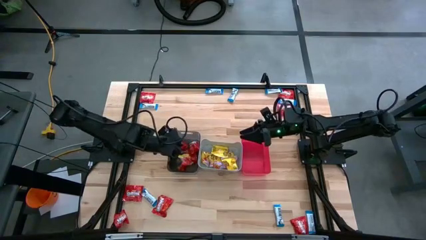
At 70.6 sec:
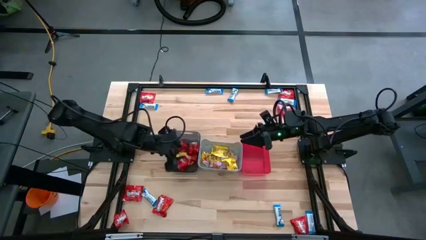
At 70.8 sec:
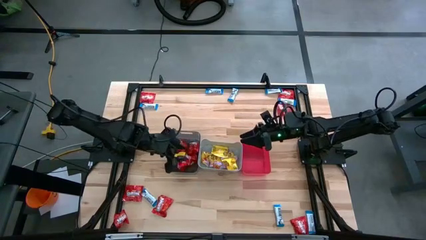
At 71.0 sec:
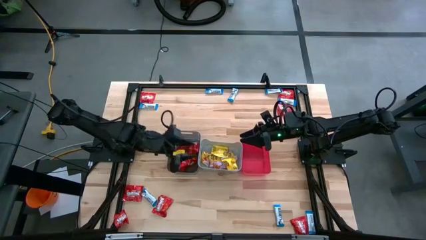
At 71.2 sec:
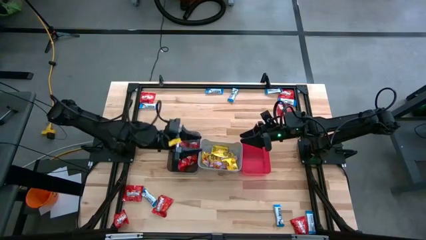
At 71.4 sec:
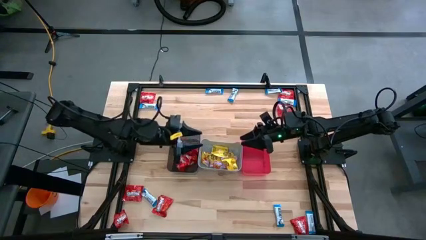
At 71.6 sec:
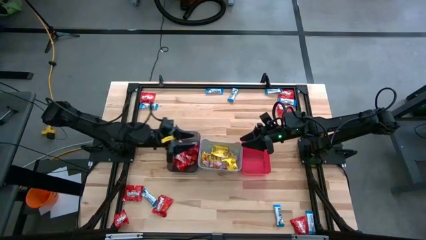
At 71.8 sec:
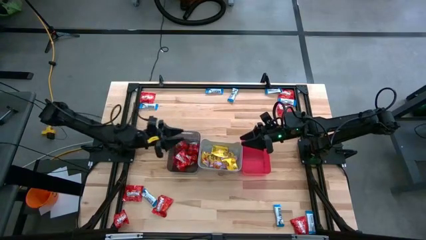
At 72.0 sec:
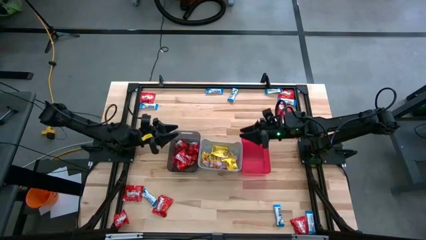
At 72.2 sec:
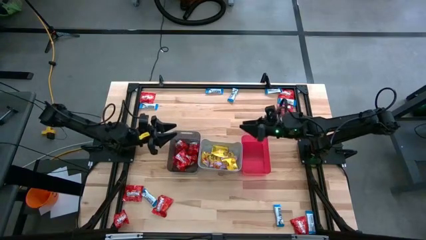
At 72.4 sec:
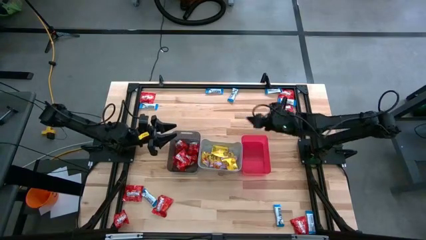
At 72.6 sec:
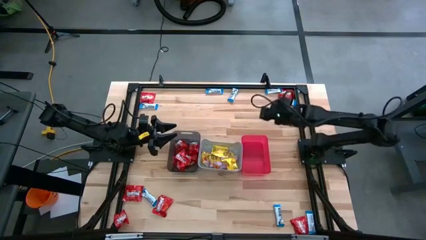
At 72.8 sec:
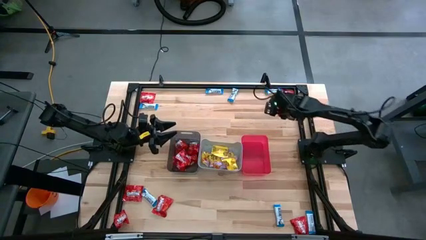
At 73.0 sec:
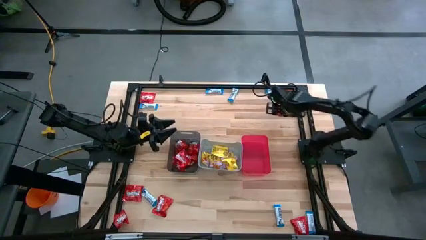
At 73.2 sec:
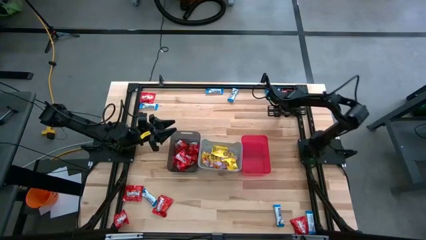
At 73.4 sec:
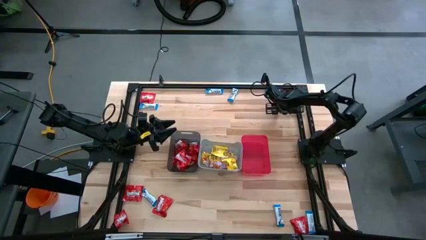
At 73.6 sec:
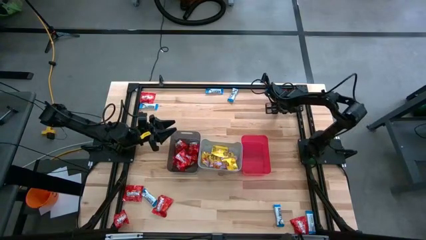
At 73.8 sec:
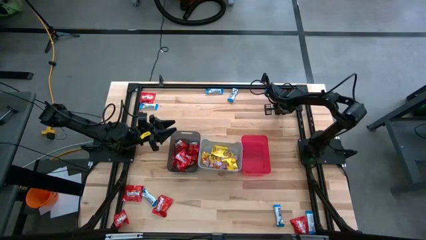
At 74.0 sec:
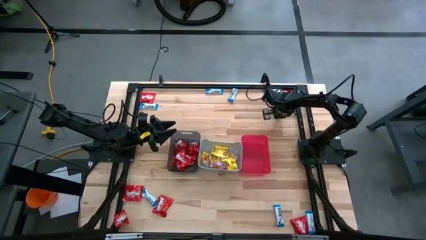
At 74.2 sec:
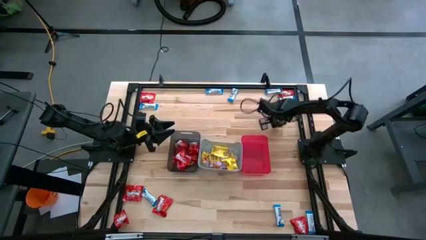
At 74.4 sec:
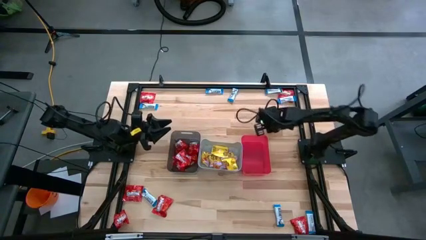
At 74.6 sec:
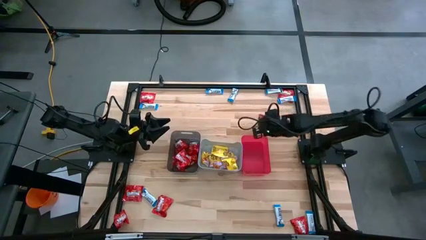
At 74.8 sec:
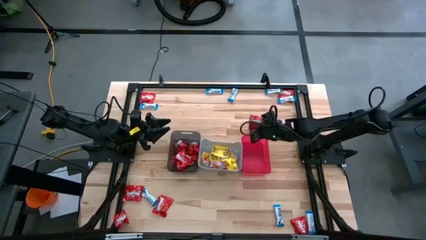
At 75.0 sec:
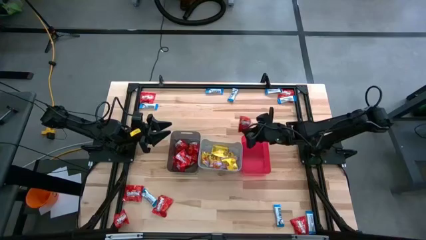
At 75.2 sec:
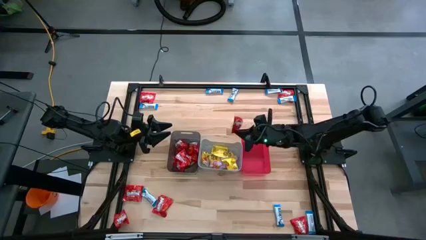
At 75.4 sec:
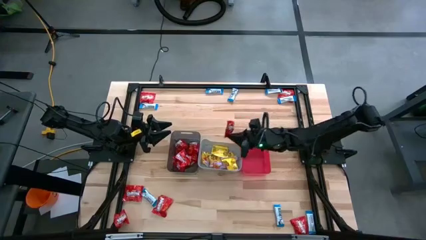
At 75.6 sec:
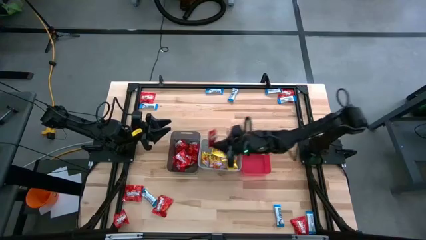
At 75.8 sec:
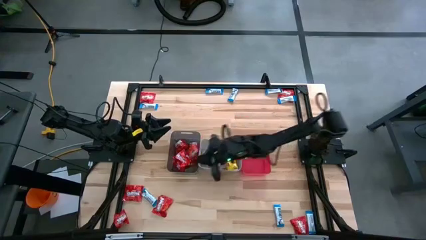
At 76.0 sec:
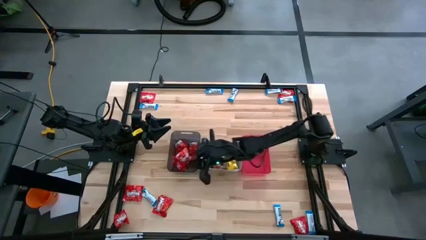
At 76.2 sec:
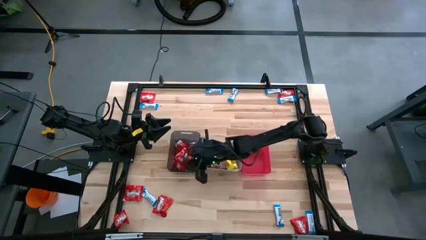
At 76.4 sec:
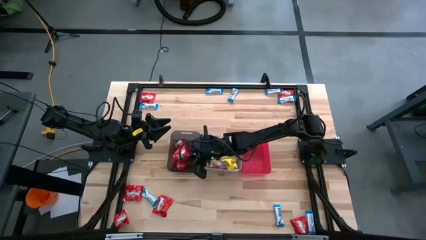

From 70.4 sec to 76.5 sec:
Task: Sort candy
Put the red candy into the black bin

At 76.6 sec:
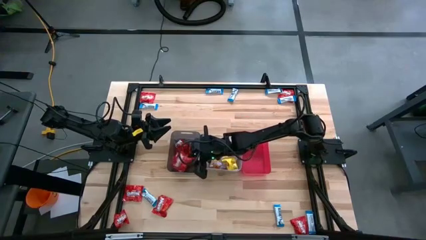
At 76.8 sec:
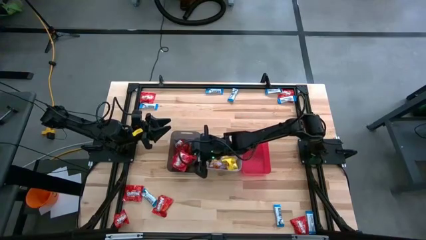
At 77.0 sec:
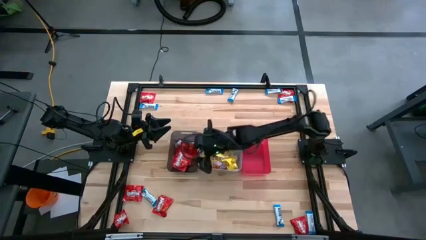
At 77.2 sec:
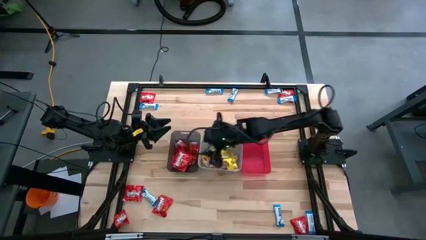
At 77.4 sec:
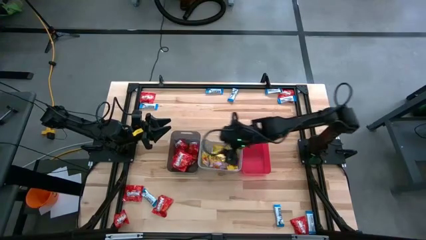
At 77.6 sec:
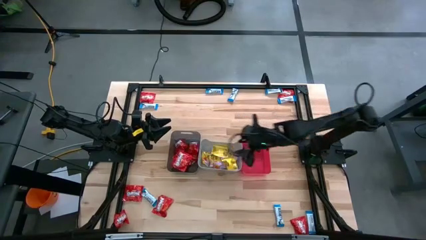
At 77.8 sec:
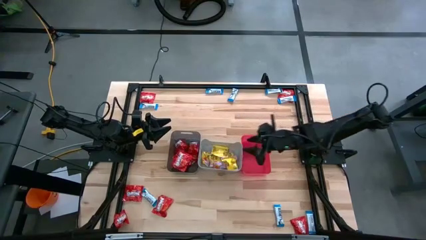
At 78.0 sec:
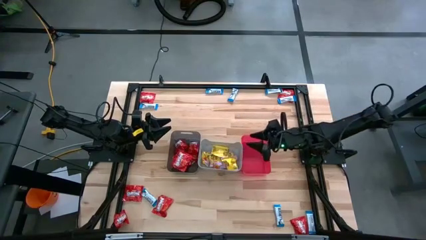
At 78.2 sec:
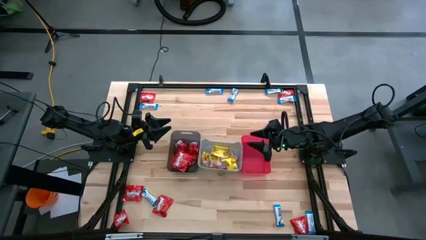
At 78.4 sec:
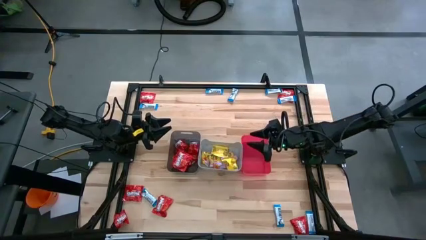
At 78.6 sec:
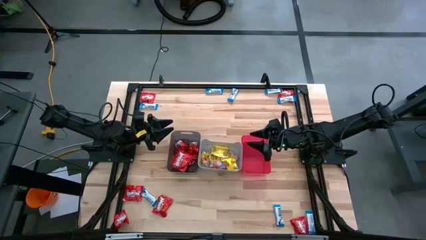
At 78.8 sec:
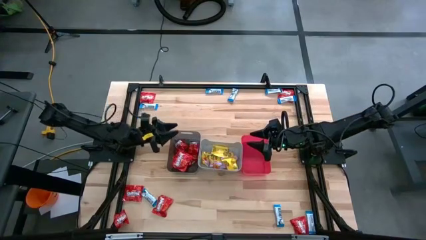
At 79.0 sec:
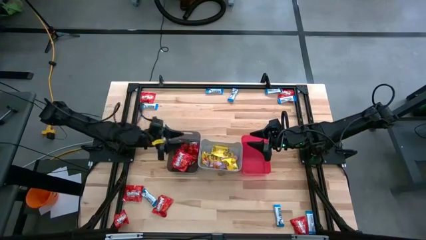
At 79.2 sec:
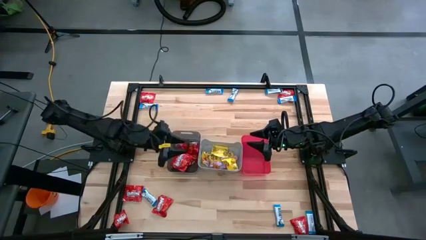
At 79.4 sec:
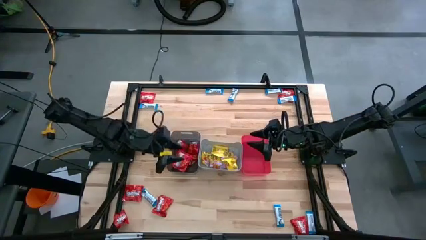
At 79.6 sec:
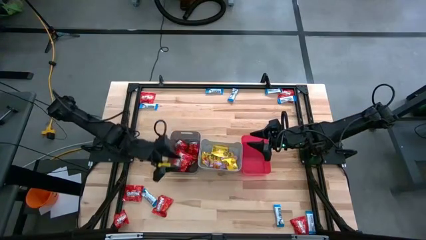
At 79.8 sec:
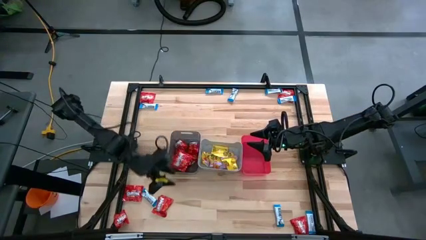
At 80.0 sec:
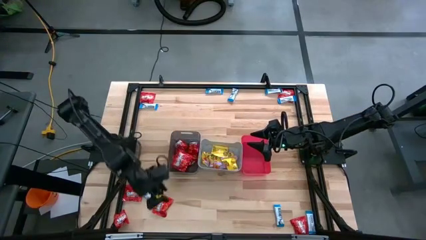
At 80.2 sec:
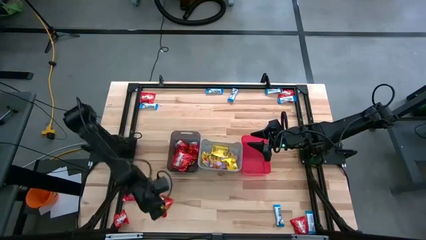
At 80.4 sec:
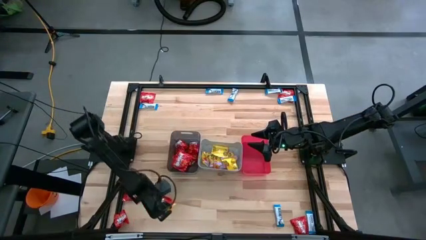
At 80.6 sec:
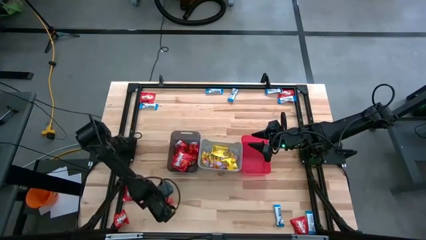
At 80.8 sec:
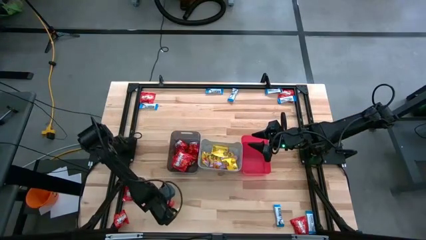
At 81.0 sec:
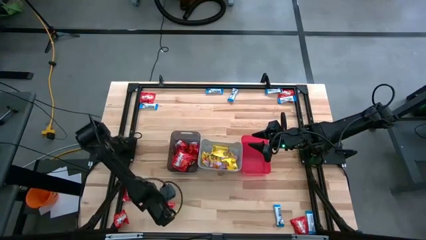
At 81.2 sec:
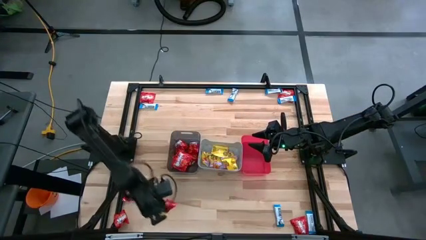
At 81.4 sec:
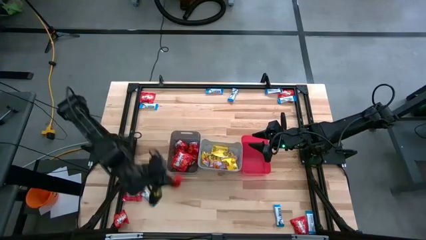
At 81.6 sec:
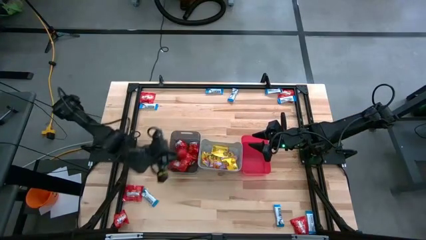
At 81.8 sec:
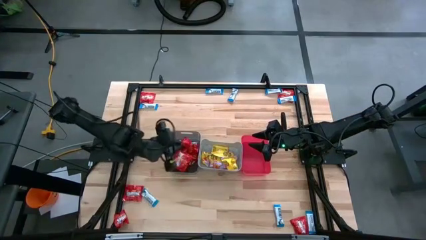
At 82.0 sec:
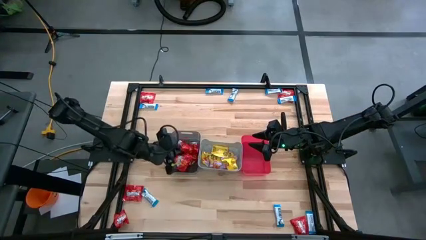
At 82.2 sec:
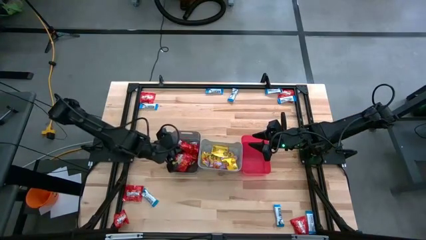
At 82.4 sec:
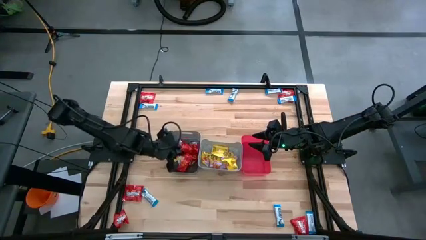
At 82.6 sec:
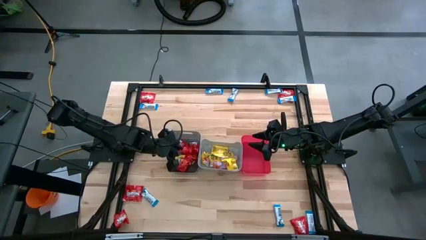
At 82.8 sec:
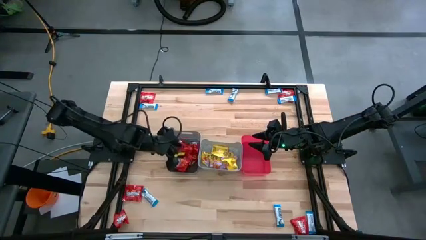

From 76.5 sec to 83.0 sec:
Put the red candy into the black bin

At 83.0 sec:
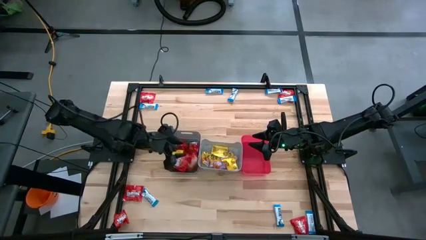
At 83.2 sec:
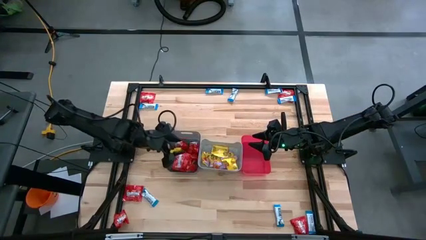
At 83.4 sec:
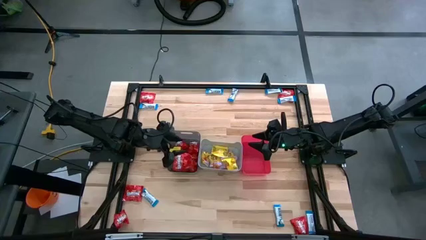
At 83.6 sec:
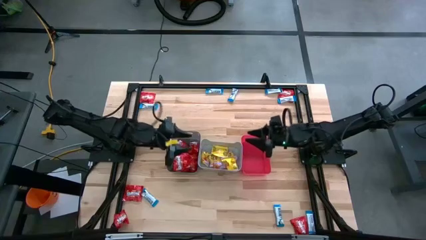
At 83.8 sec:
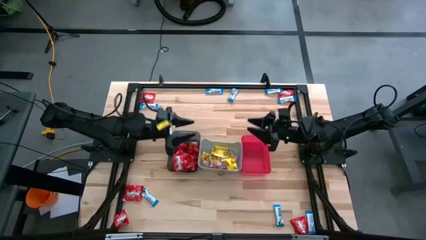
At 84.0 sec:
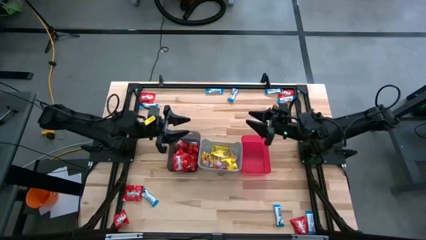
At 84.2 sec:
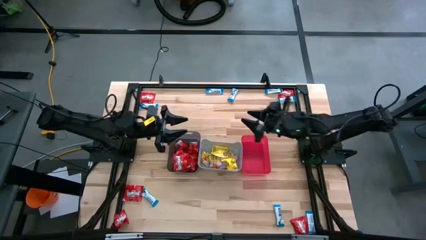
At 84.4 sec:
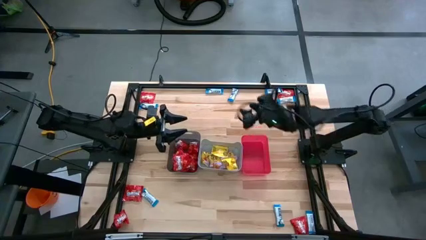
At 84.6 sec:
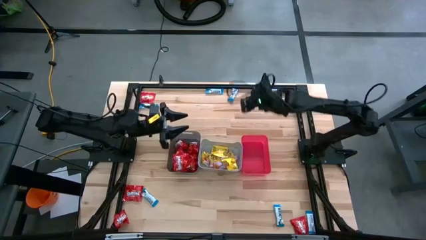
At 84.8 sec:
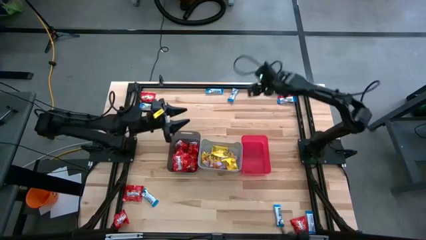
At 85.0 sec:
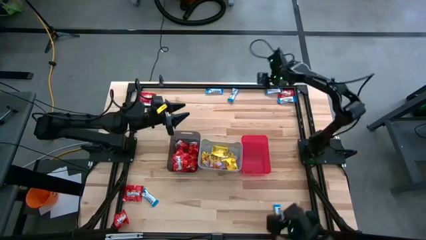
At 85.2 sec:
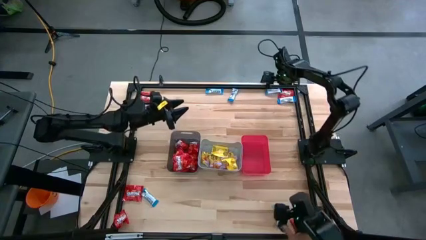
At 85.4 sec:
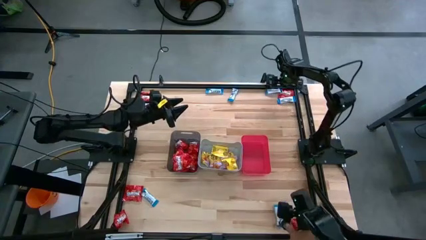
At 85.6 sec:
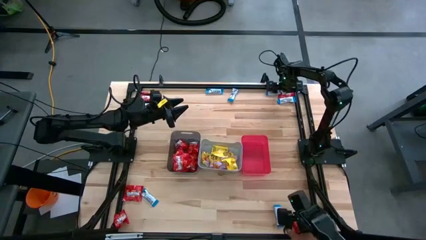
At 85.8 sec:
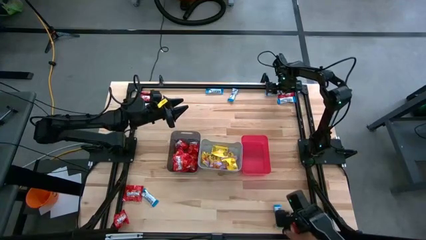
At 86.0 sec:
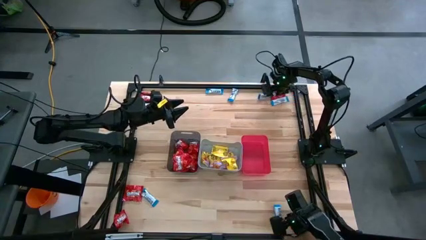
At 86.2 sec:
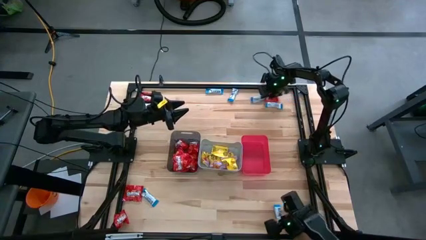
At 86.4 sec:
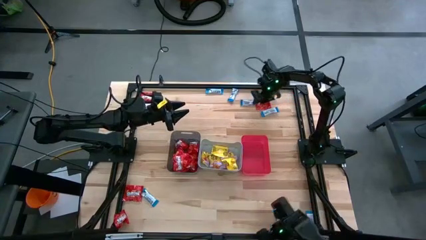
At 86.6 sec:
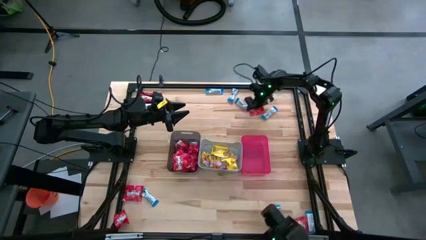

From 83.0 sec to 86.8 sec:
Adjust the candy and chocolate packs

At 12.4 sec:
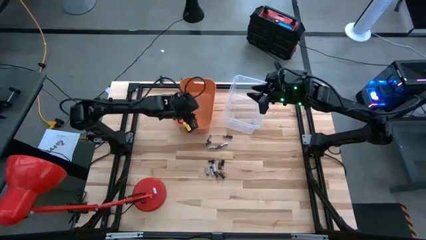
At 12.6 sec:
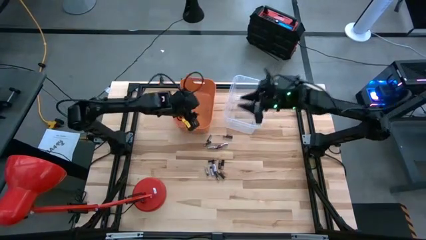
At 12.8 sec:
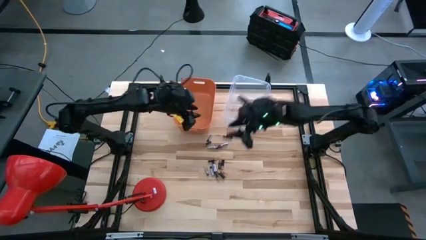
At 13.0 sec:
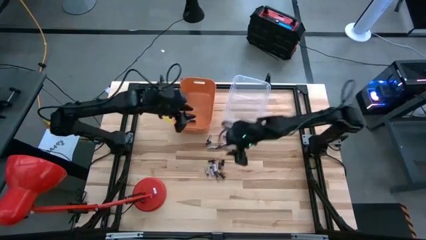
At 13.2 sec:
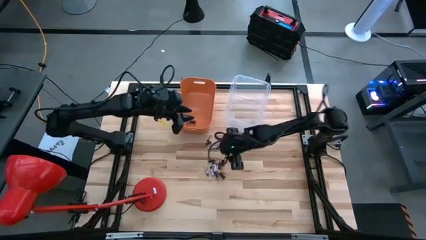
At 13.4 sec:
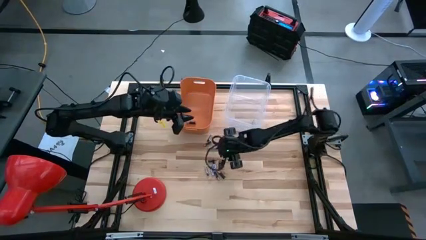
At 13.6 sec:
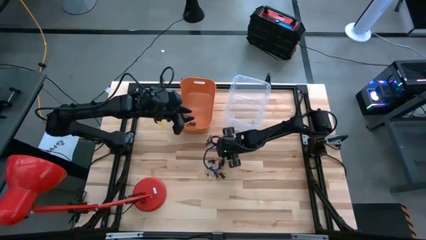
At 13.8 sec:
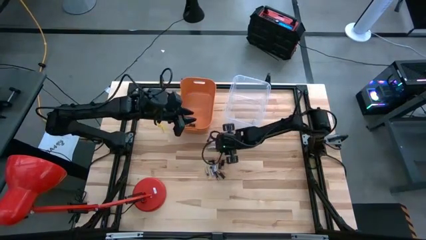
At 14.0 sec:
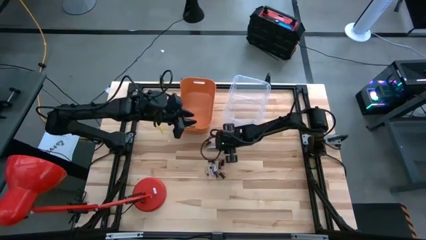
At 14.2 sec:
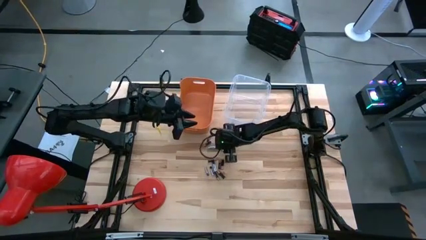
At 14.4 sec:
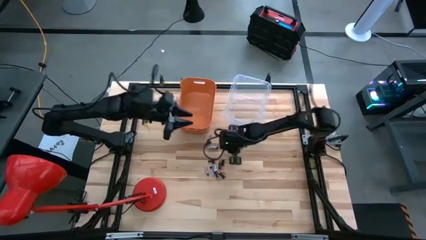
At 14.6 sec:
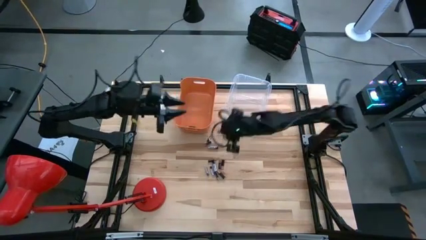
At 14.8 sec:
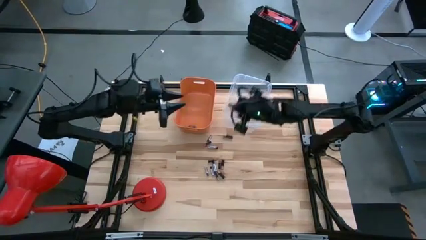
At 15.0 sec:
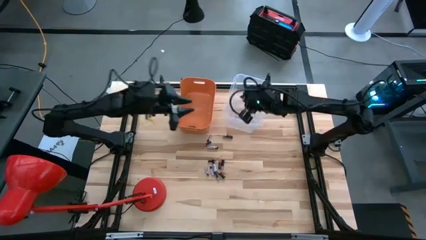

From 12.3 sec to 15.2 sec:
Task: Sort batteries
Put the silver battery into the transparent bin
